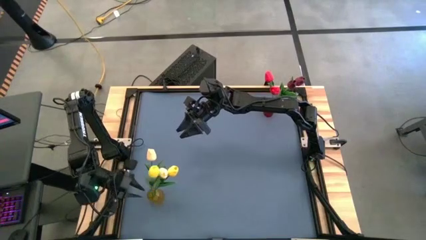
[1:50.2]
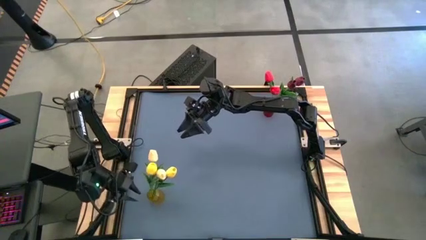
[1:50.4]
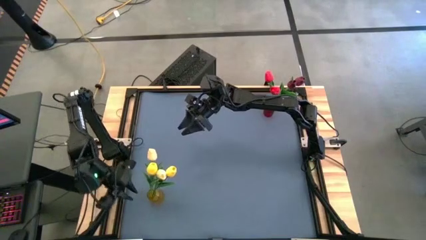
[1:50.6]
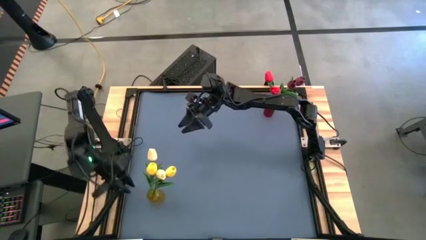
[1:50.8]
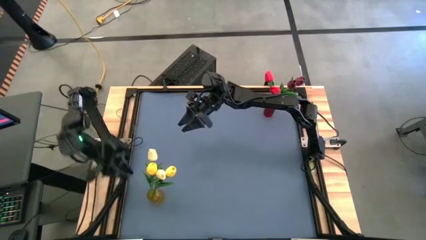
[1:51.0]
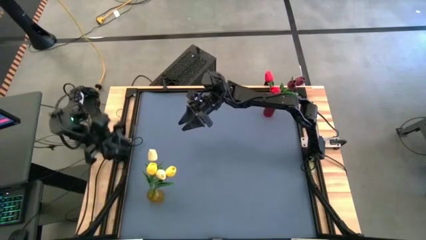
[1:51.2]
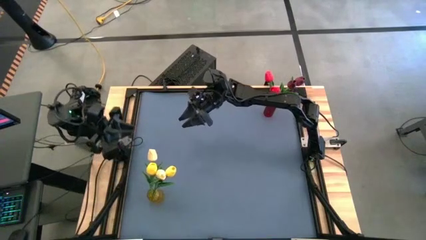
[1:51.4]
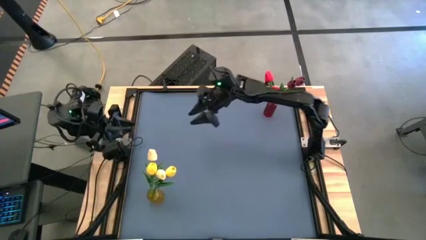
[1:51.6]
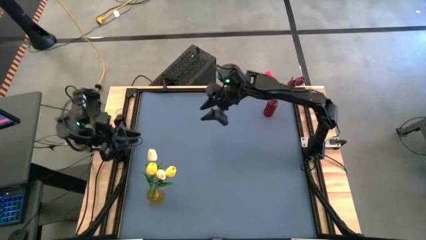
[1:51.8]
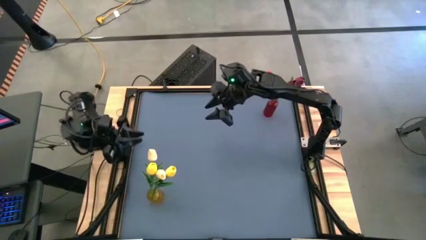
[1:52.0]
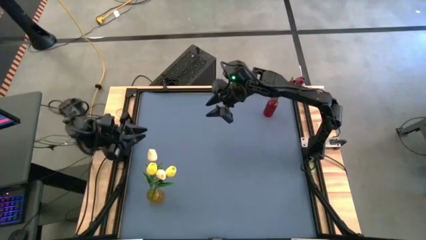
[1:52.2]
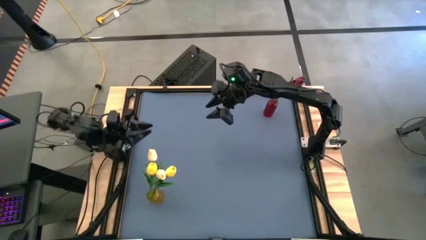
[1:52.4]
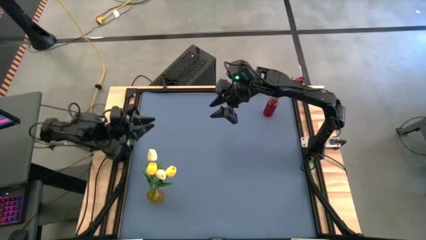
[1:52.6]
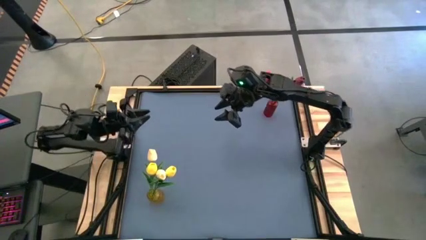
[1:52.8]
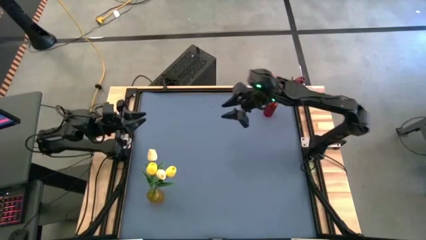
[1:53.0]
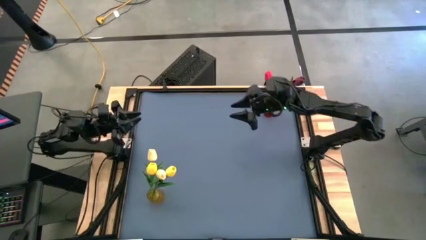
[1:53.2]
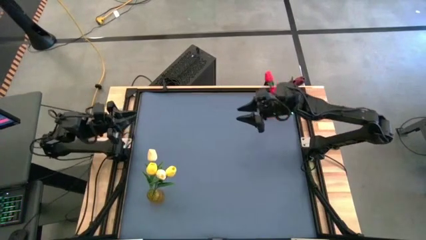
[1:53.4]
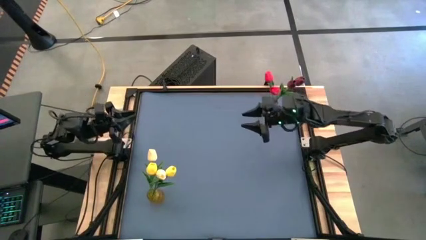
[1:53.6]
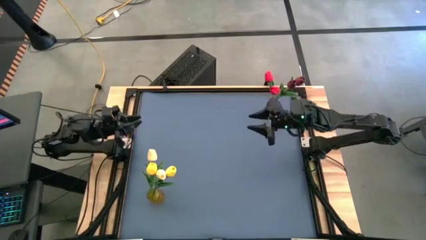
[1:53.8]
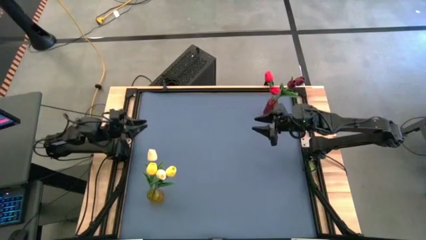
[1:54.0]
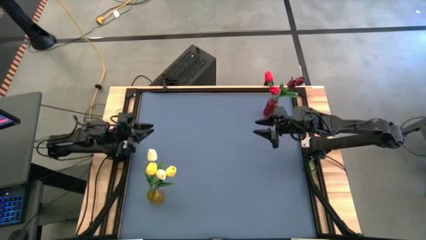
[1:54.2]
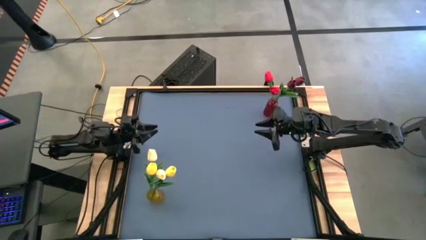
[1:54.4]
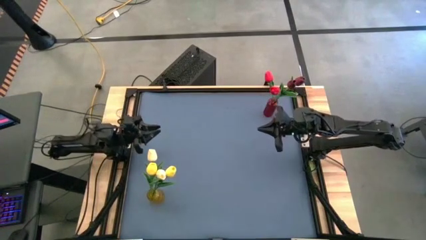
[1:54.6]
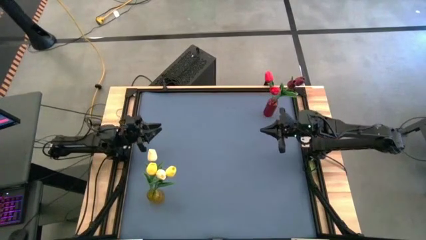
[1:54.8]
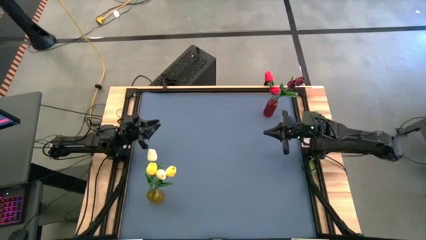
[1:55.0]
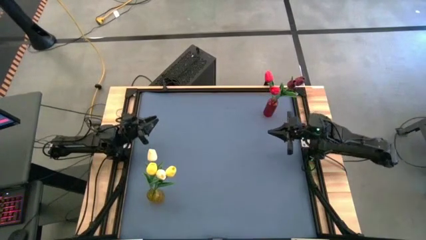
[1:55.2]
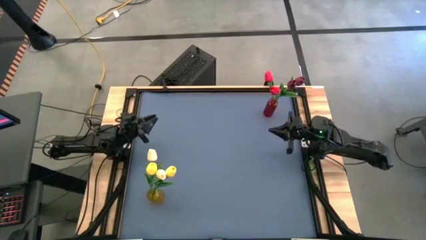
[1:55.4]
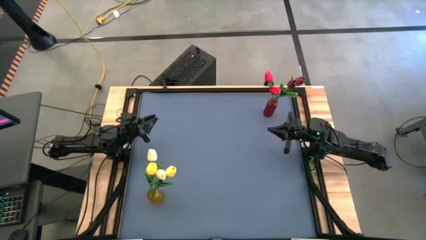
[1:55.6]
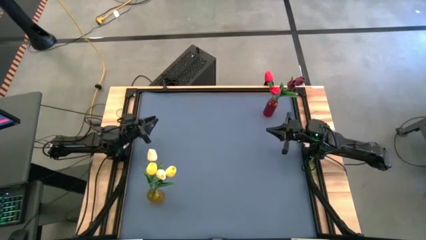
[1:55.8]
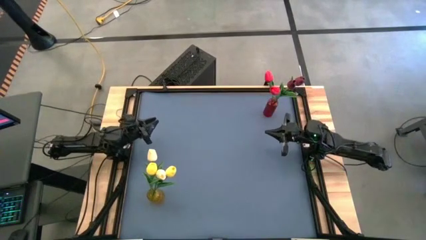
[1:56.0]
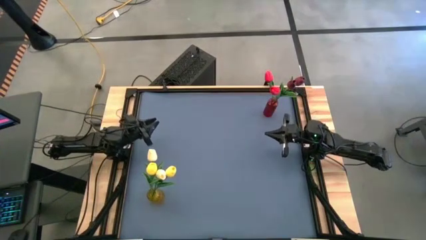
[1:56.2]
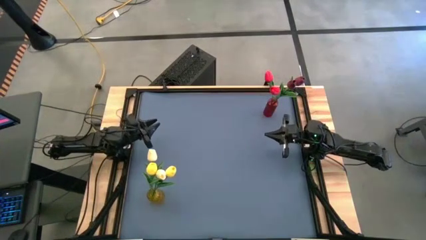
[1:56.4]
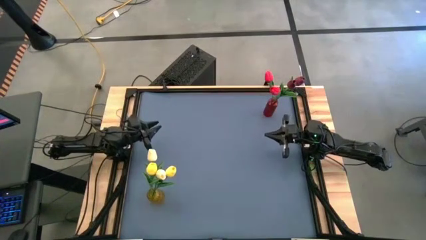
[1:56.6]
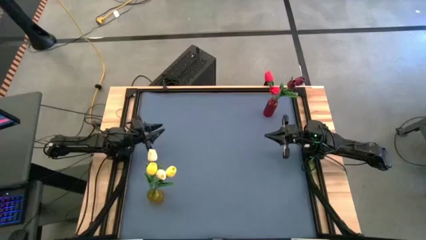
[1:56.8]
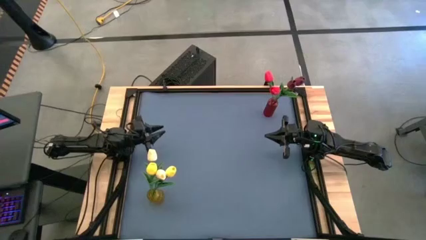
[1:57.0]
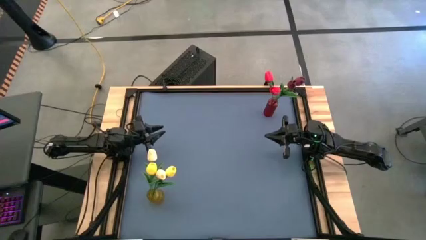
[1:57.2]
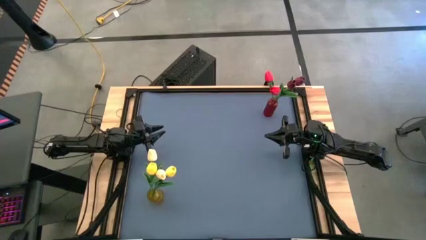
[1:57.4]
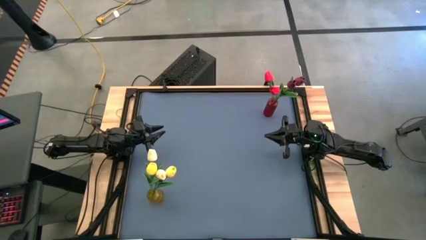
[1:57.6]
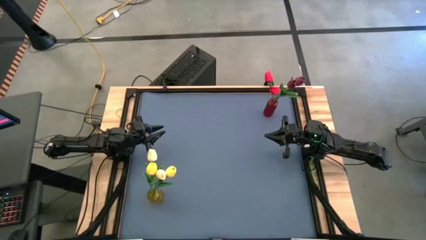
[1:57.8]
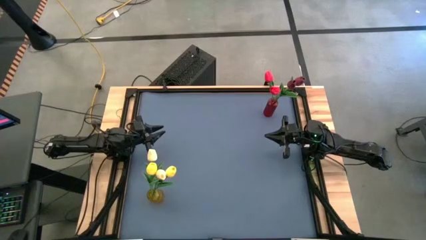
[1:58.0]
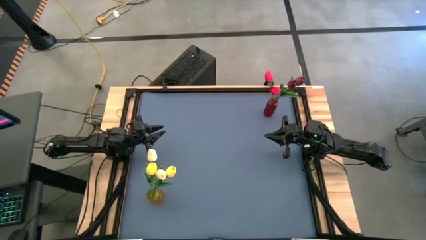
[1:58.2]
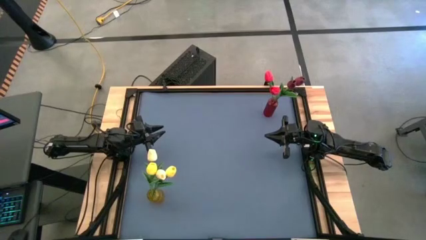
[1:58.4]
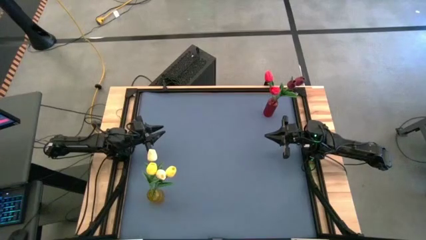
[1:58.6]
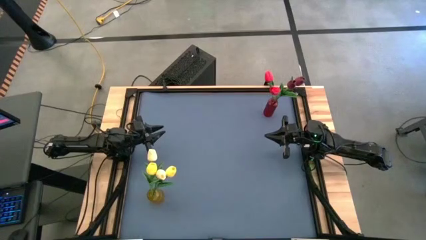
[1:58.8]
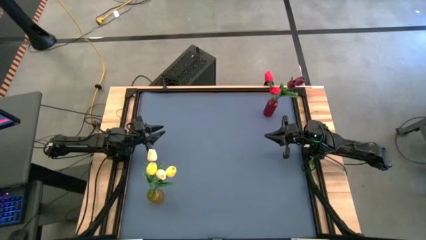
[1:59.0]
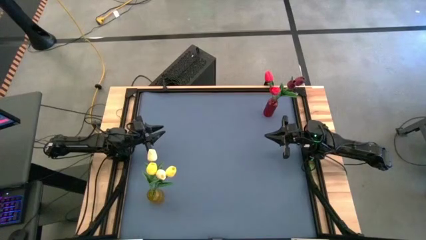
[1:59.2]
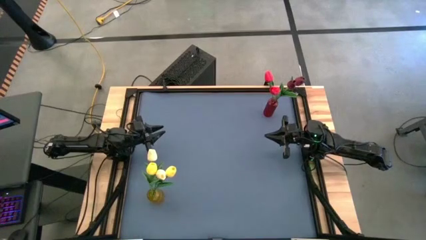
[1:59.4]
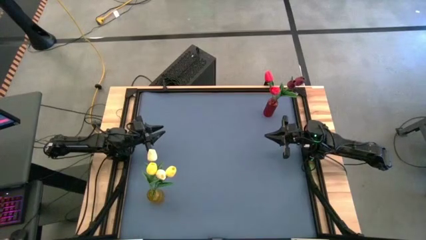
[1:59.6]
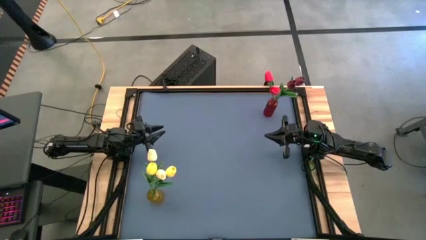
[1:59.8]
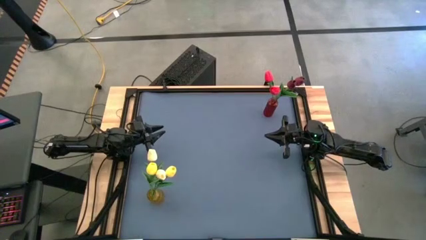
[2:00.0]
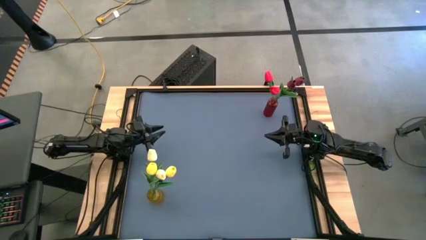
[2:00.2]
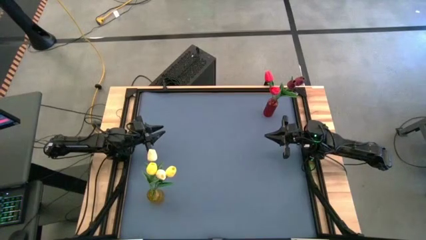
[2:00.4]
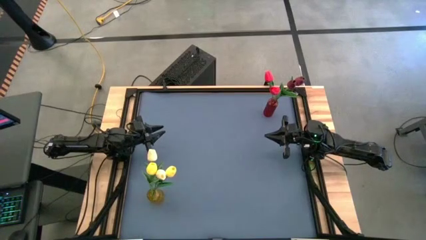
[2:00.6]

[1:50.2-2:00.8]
Task: Sort flowers into vase by color
Return to Home Position
